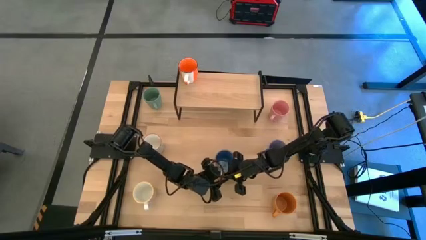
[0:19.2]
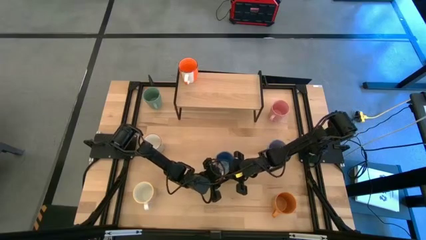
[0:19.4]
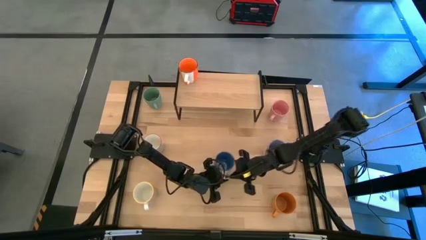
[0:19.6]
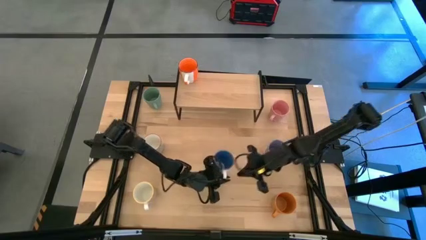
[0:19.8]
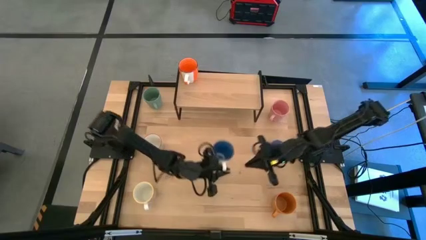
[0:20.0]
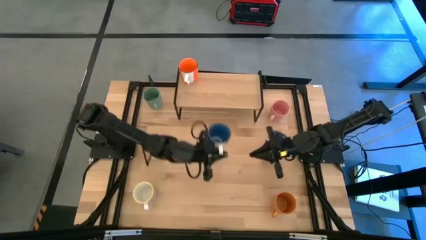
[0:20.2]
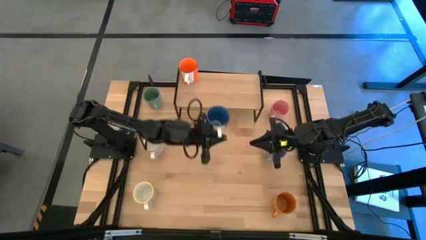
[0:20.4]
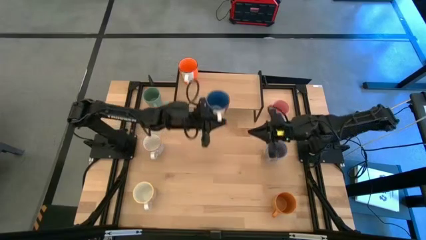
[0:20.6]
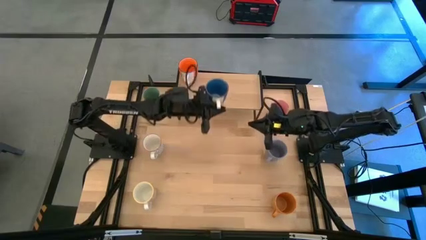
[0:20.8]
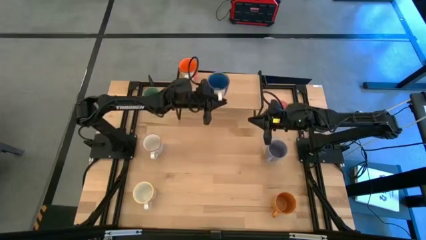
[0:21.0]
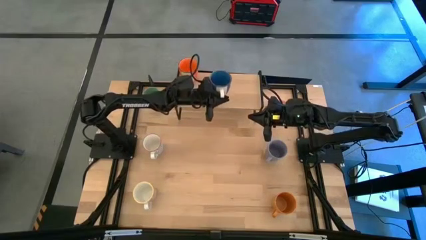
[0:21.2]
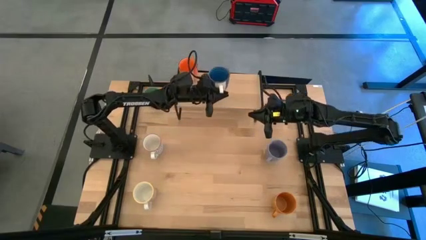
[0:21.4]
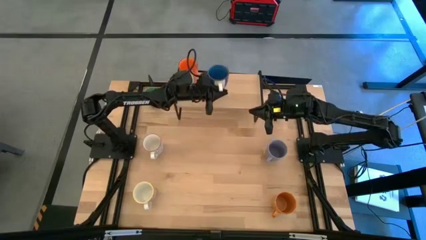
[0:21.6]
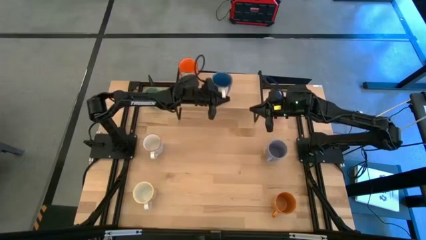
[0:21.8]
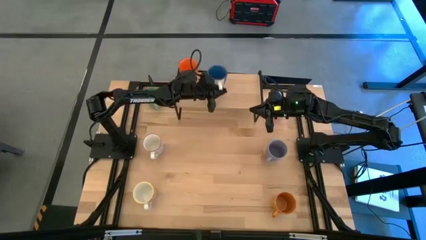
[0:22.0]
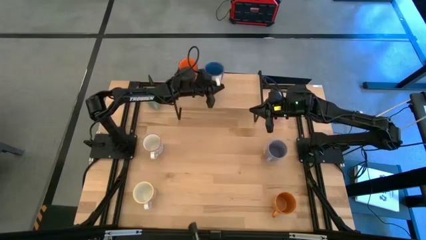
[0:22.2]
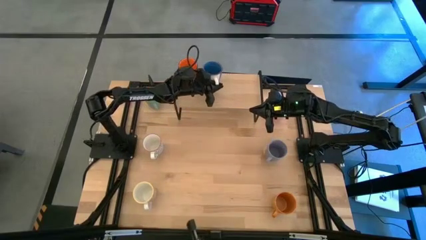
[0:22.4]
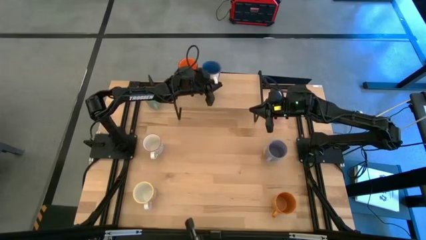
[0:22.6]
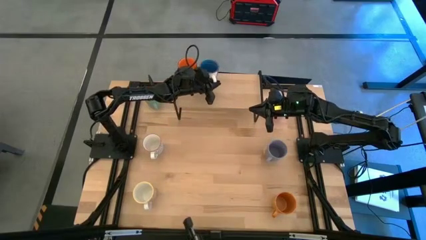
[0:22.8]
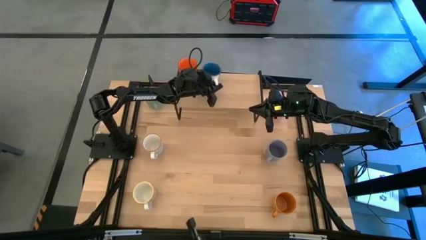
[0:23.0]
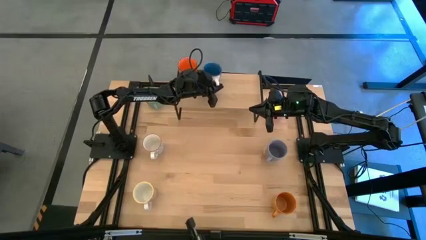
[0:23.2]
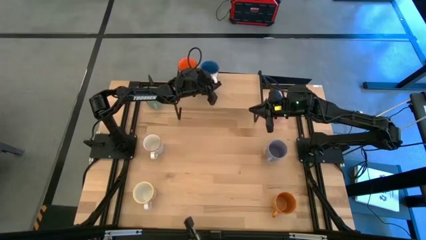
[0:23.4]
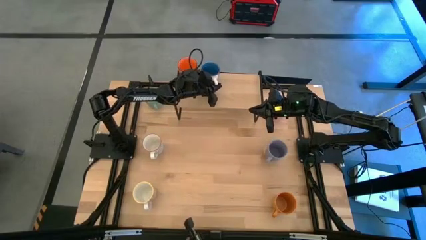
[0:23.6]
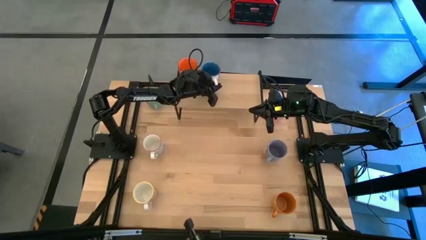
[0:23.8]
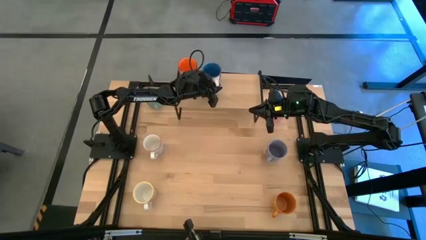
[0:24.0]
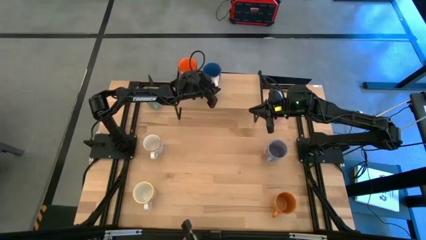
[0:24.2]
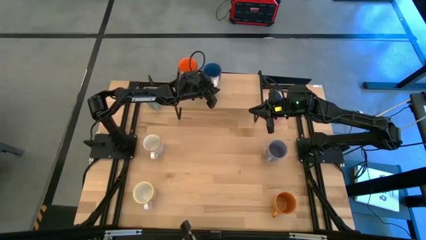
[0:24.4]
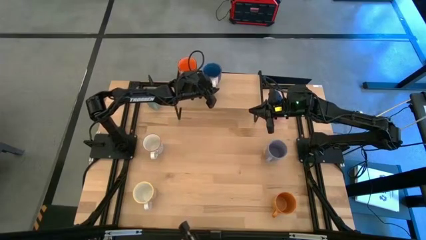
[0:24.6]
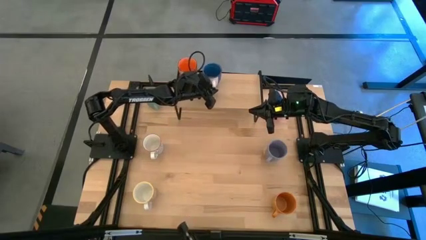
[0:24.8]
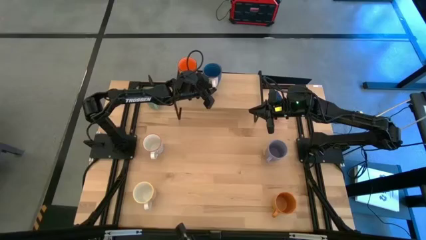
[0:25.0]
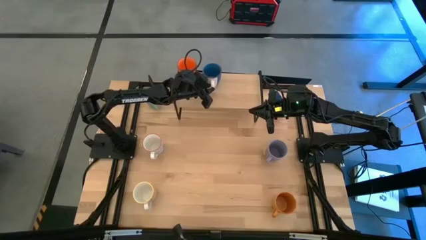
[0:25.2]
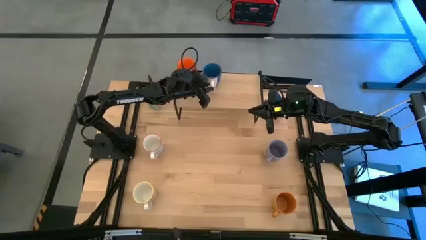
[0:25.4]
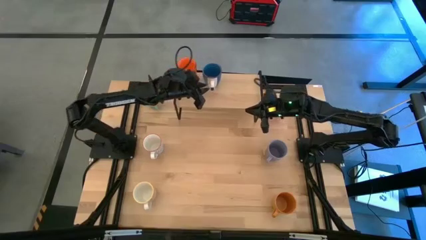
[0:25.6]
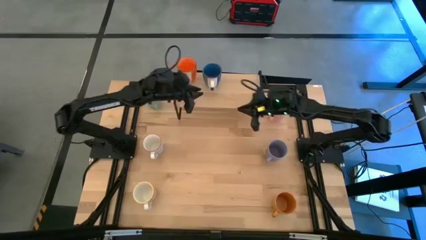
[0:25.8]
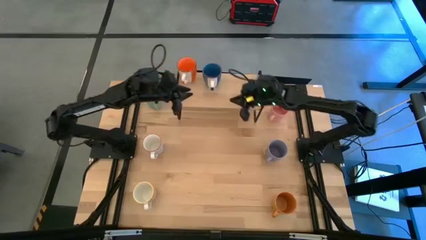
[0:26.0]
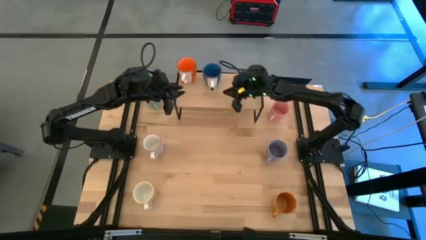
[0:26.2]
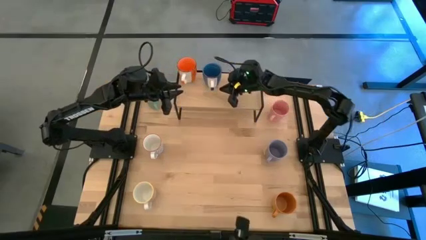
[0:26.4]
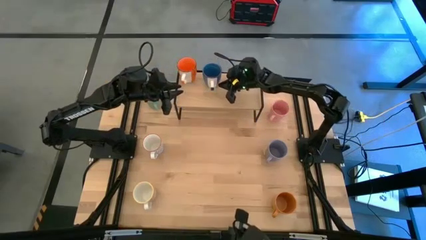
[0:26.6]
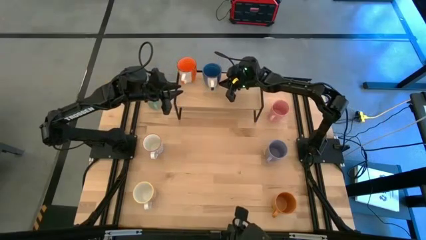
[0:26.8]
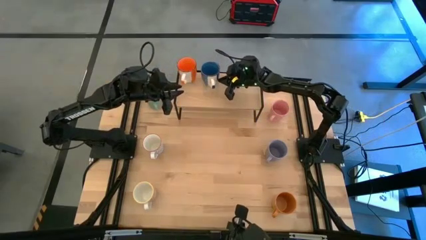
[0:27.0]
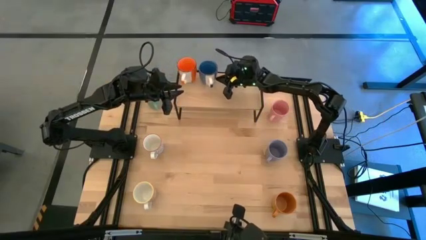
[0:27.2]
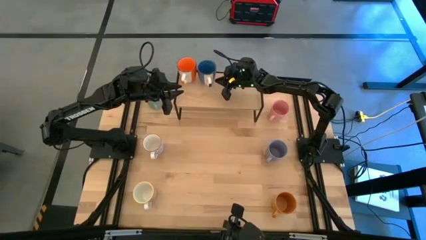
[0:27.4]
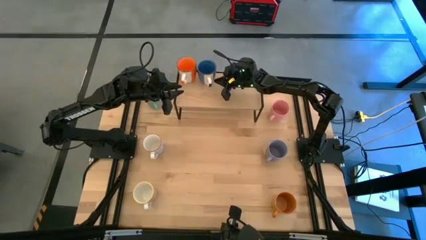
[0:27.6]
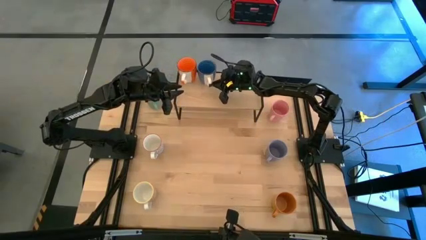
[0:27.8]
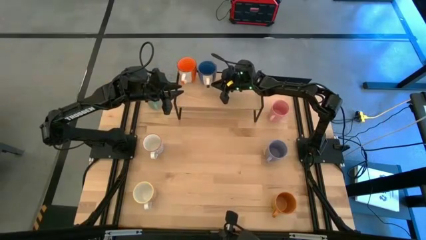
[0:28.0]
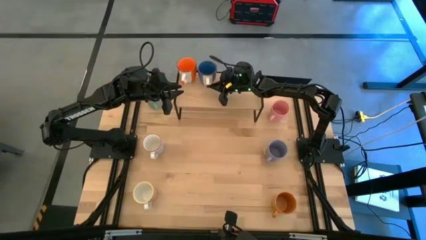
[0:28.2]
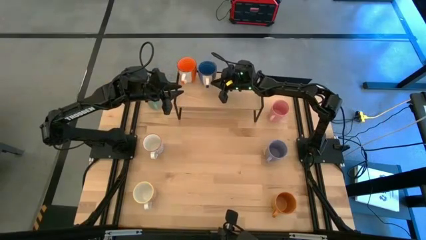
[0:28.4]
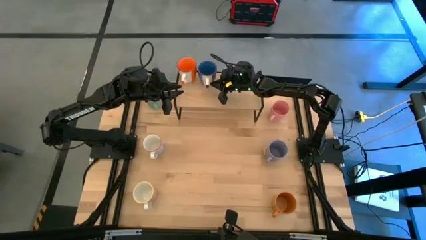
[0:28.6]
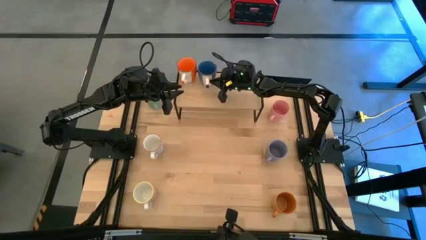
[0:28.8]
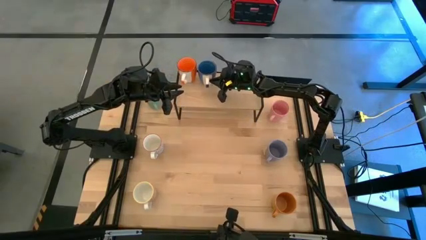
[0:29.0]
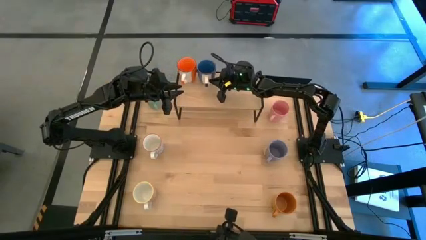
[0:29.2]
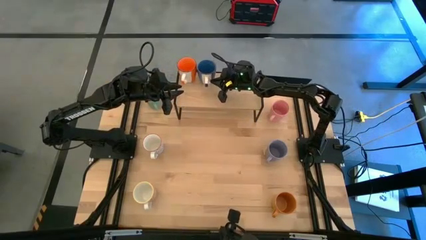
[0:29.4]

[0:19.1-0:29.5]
Task: Place coffee mugs
Put the blue mug on the shelf

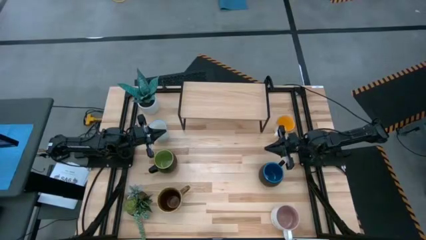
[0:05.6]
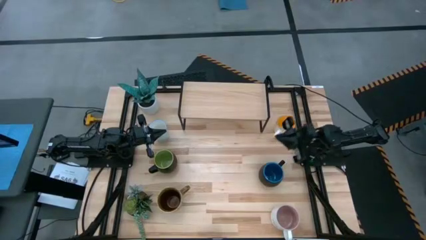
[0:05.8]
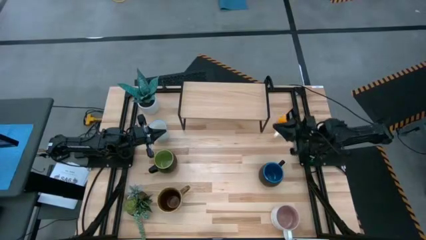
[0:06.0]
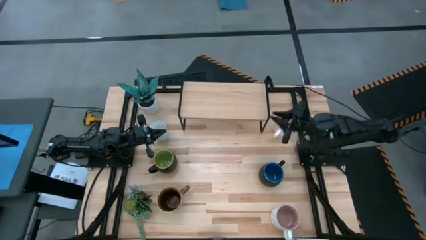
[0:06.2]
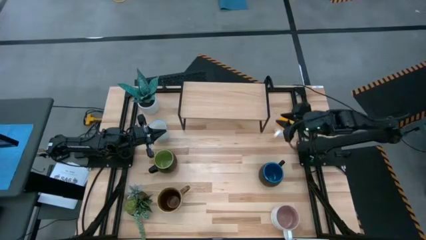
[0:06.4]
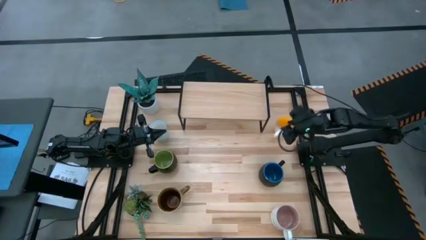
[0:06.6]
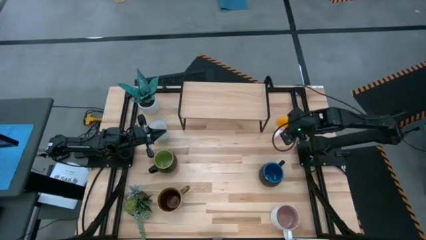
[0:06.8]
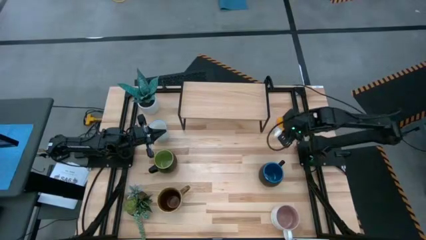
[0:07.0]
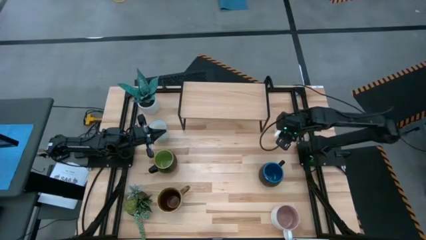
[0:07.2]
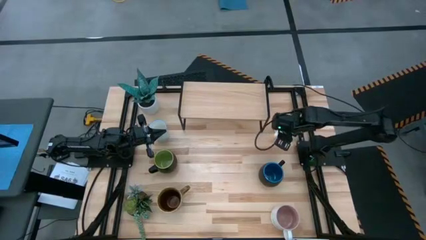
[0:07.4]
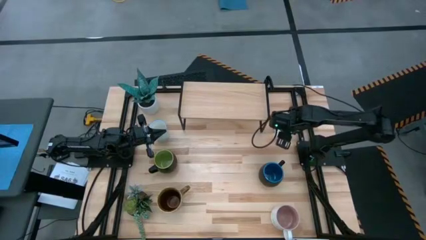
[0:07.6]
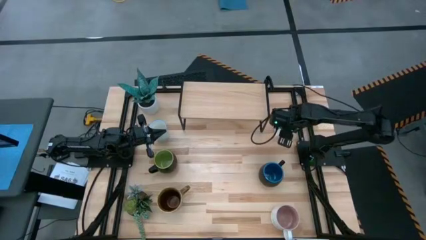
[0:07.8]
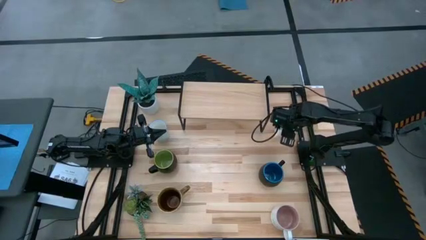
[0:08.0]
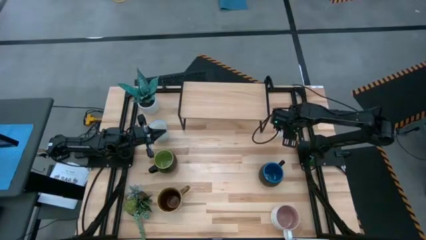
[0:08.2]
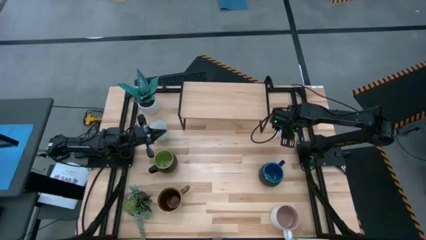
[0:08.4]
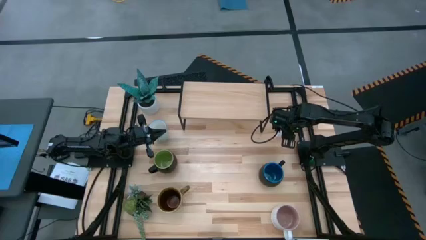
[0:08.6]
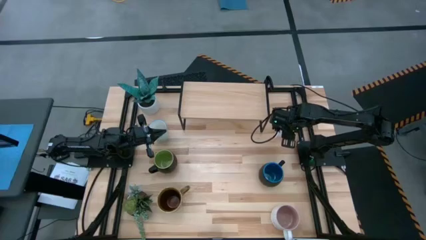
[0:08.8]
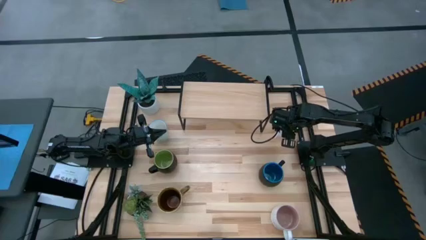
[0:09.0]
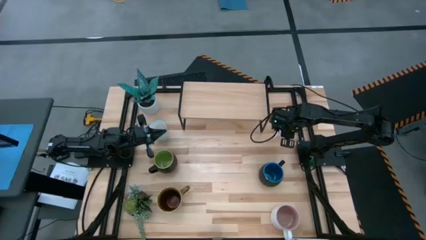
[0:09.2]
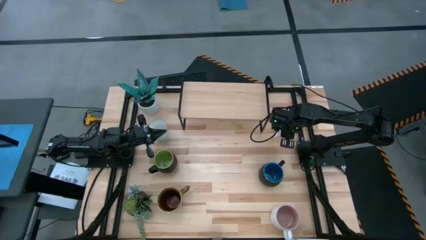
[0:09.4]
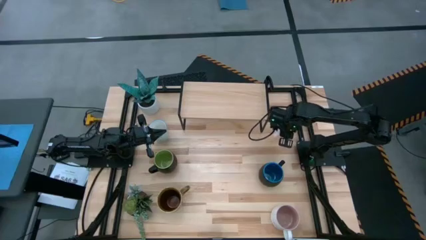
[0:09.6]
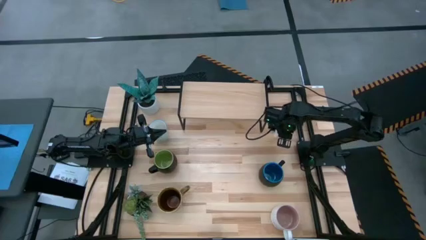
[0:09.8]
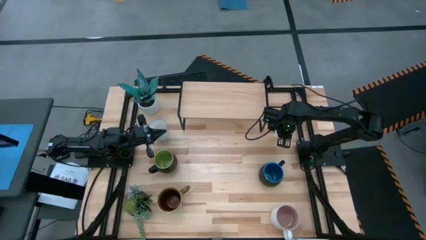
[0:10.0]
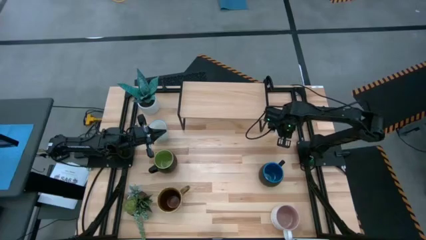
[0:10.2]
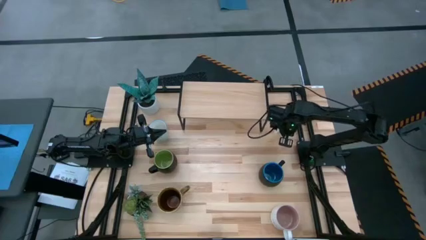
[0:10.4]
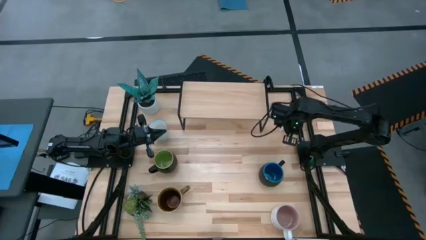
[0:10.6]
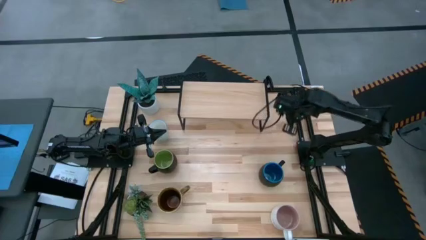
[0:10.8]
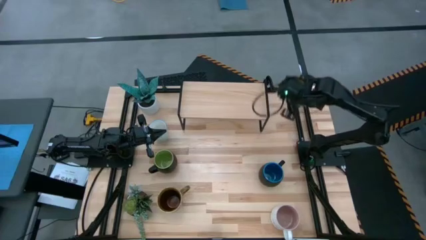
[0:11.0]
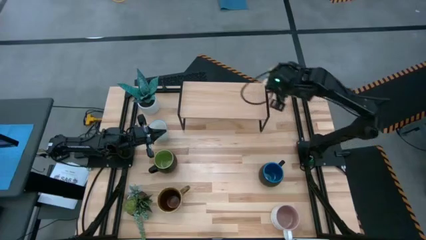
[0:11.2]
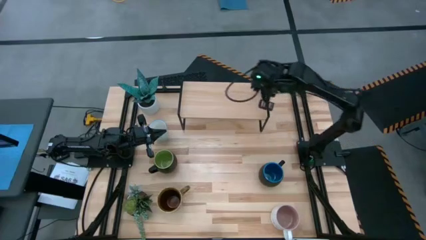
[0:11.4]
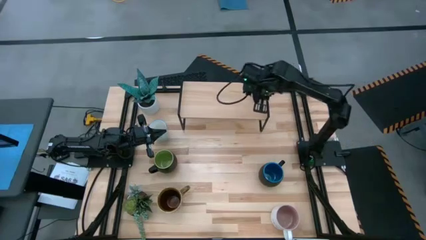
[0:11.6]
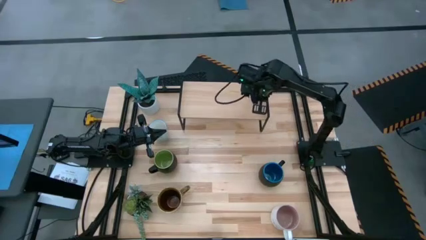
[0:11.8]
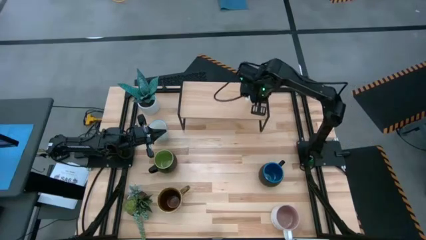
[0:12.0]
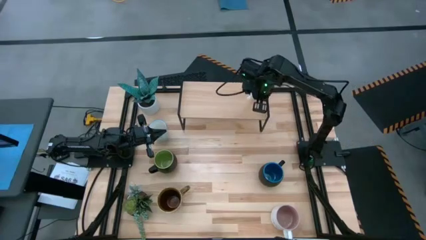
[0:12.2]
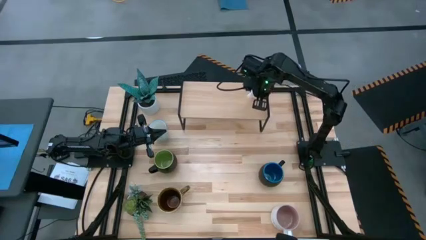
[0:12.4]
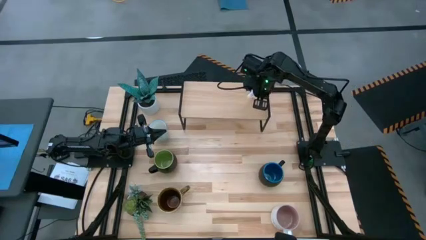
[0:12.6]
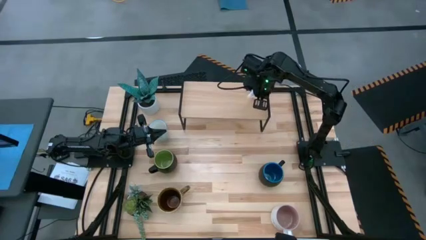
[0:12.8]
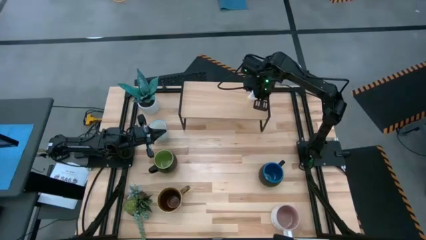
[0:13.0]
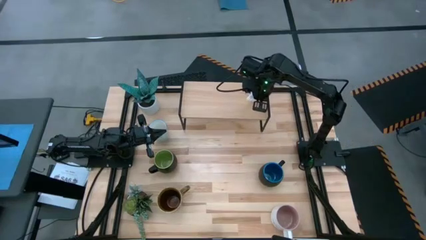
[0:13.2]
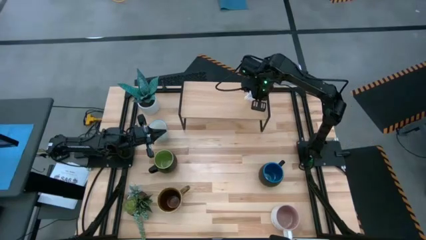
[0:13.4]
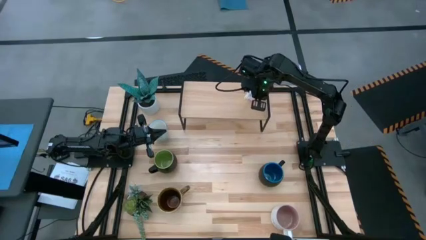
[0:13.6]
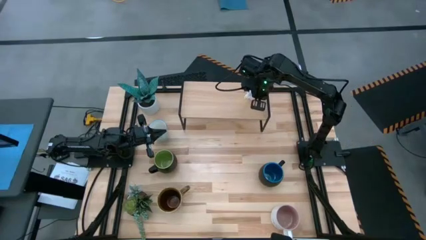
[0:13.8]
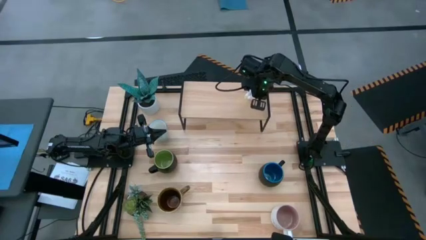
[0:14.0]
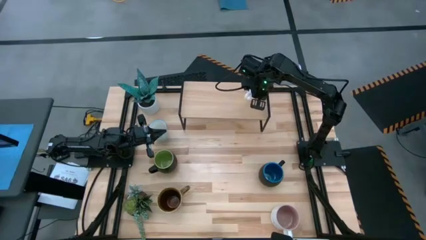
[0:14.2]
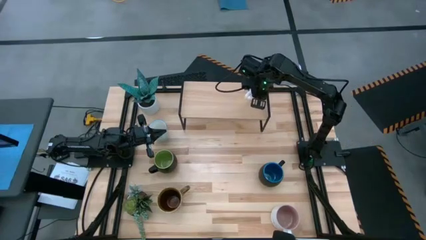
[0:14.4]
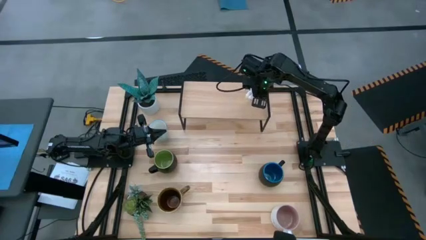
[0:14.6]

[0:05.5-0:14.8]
Task: Place coffee mugs
Put the yellow mug on the shelf
